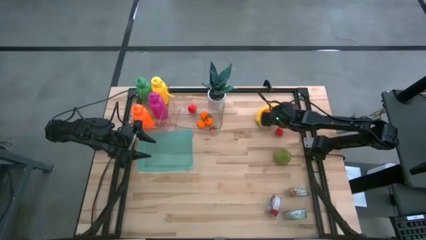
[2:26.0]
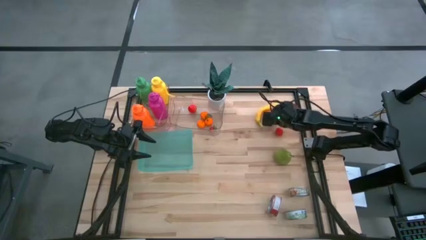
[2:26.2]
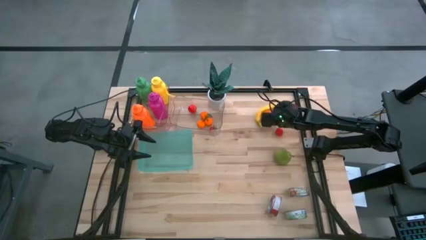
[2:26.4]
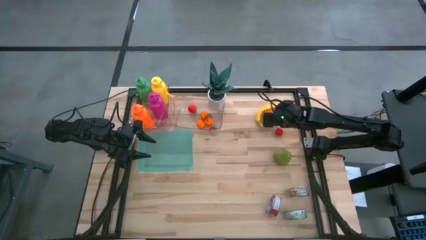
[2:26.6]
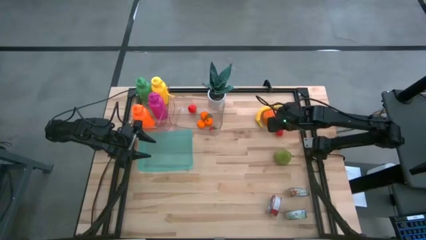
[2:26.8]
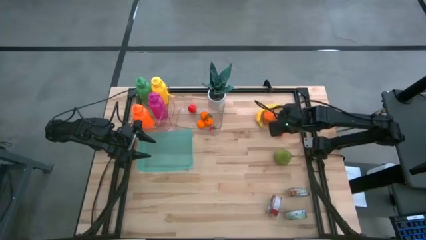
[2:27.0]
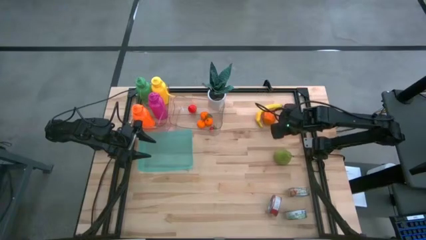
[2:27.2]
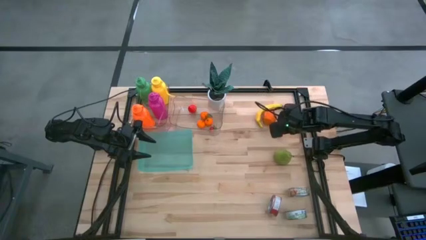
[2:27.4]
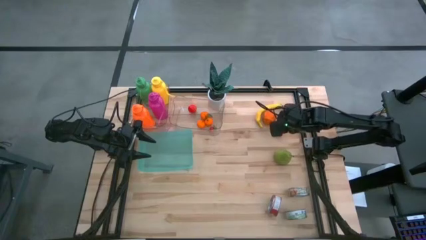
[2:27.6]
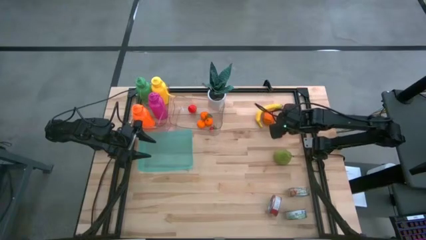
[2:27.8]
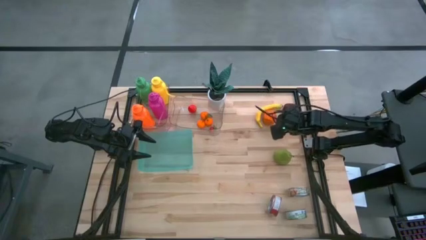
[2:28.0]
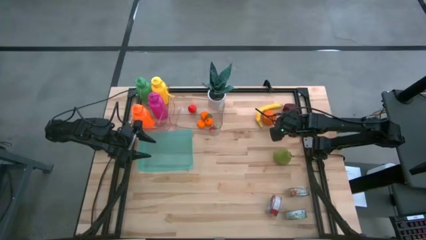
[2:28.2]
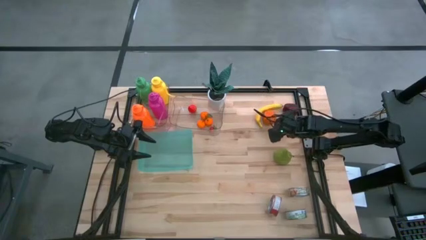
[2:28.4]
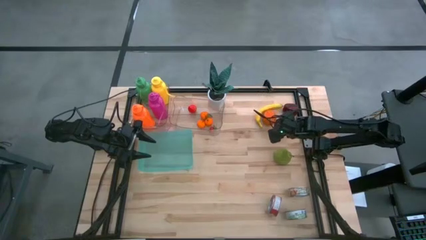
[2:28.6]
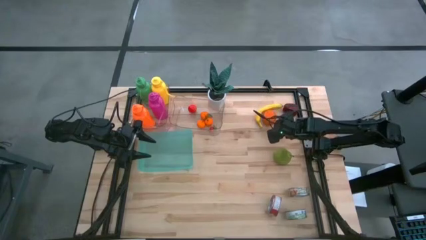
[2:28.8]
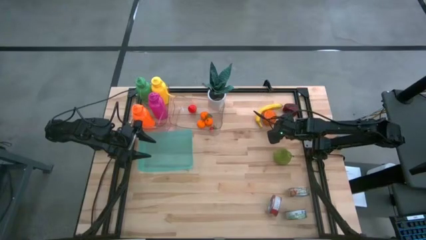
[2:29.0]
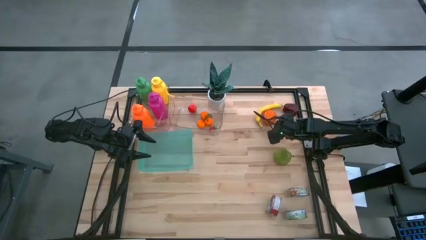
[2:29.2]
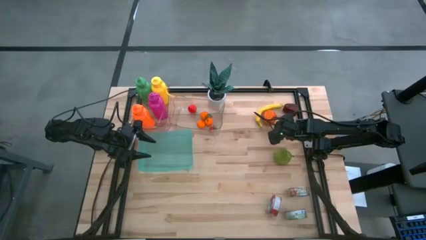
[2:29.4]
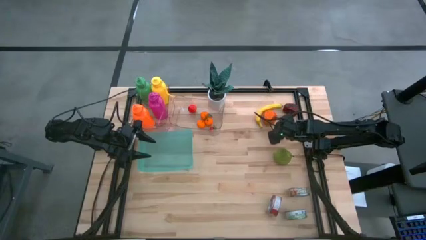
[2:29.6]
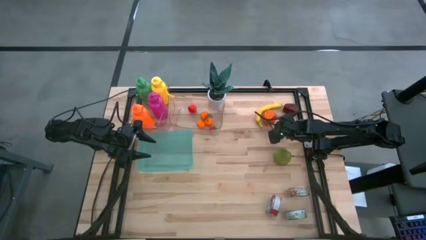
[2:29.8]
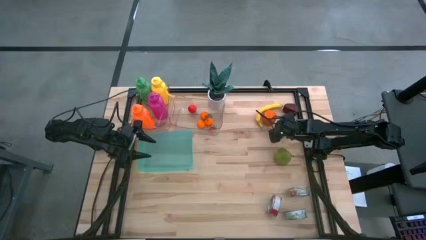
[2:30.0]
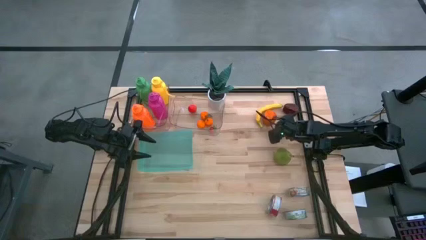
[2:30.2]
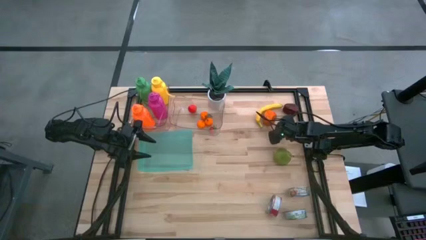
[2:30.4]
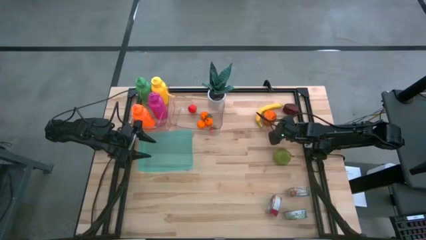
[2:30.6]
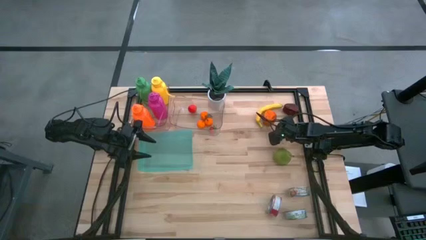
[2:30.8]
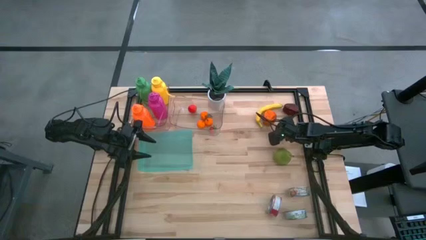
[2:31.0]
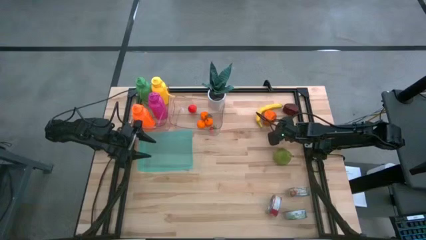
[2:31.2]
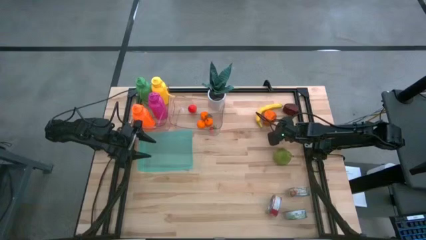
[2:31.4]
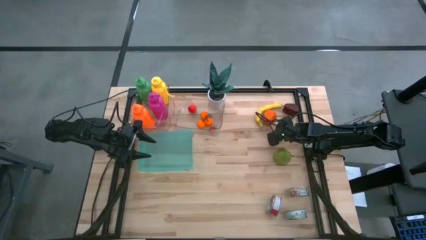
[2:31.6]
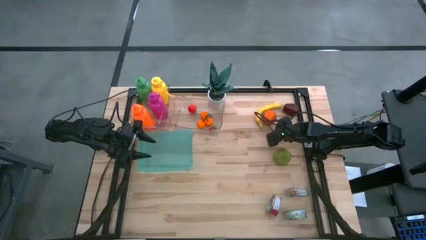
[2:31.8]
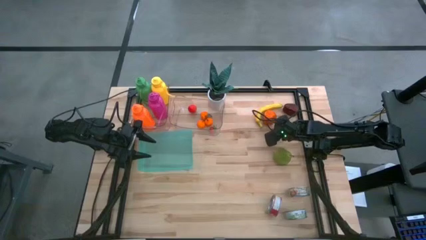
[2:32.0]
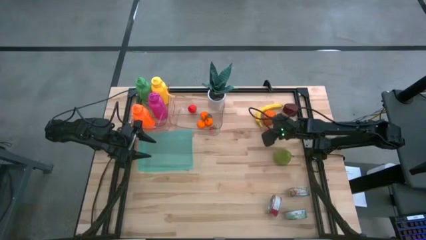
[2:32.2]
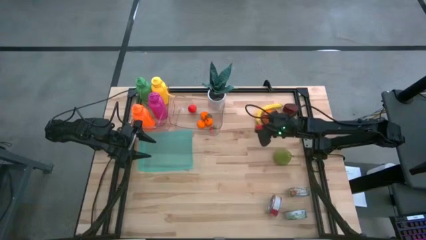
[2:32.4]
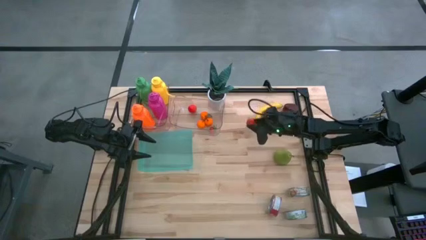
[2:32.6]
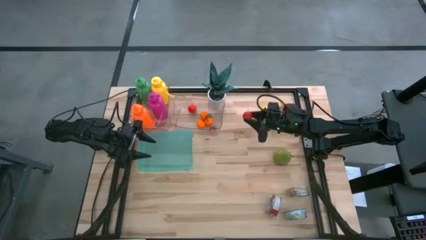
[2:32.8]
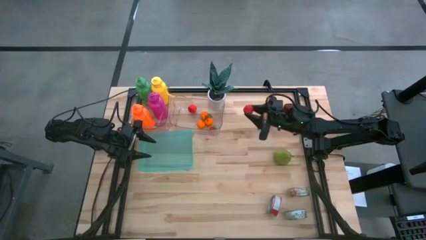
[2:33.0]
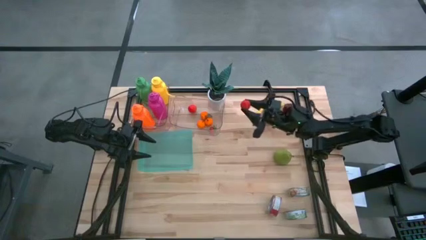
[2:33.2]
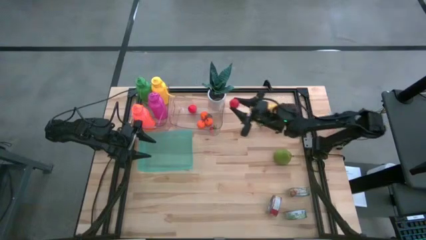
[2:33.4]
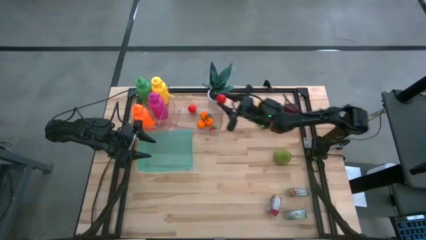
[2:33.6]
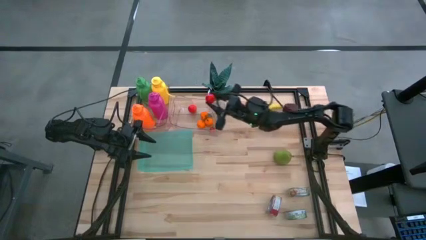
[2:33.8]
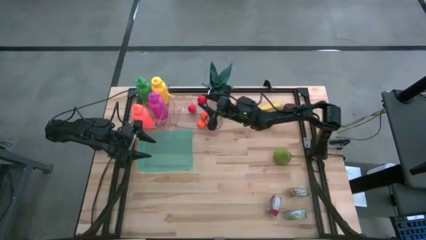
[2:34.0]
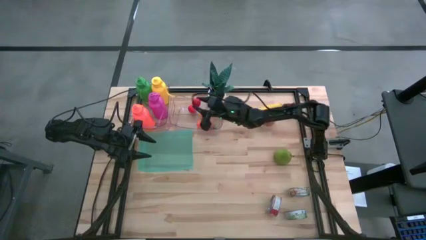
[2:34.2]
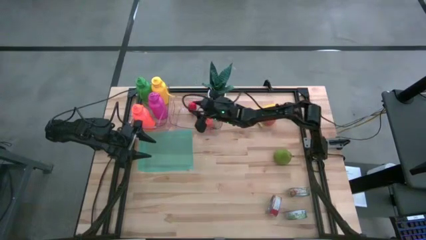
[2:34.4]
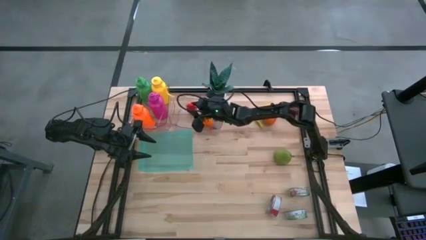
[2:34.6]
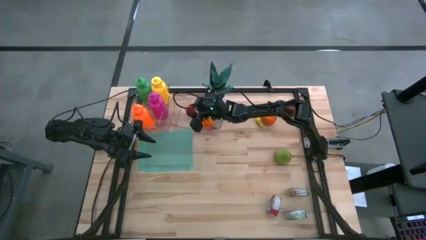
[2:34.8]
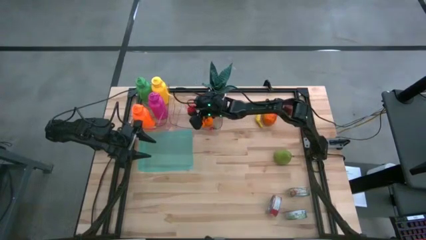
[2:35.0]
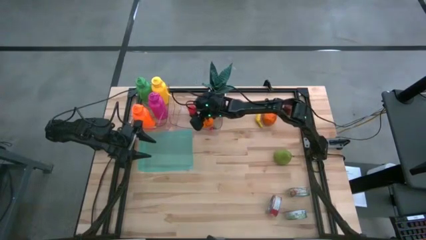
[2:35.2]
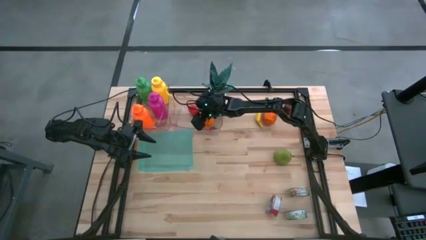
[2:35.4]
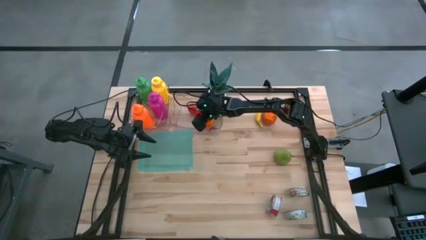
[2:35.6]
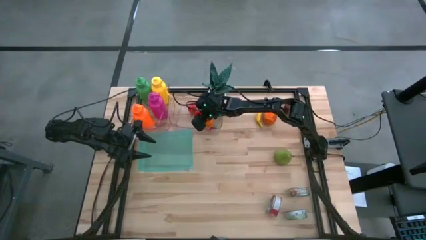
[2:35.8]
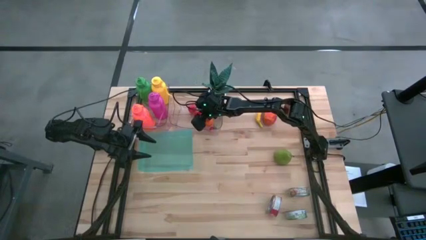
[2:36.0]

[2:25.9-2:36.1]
Task: Pick & Place Food Item
Put the red cherry into the right transparent bin

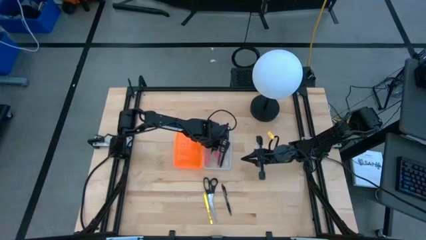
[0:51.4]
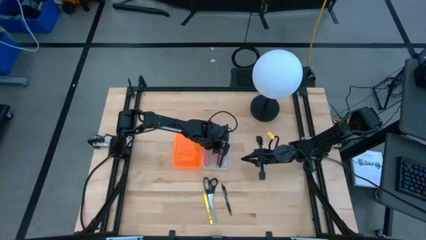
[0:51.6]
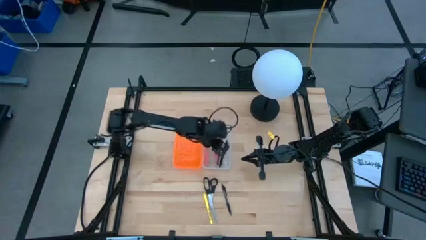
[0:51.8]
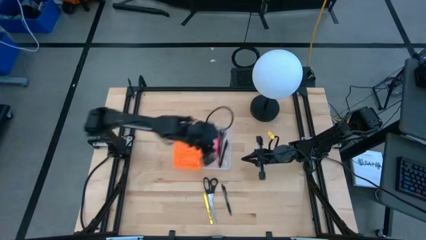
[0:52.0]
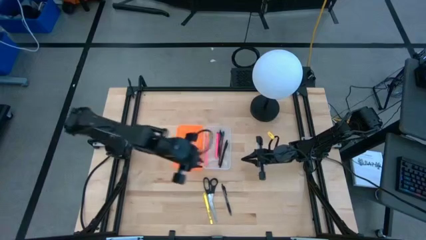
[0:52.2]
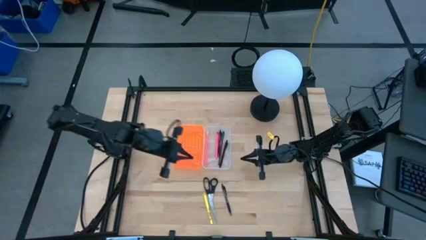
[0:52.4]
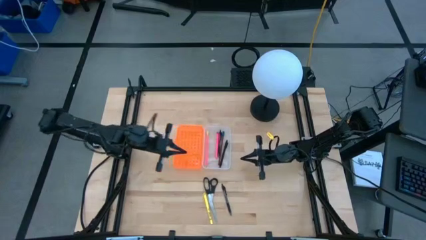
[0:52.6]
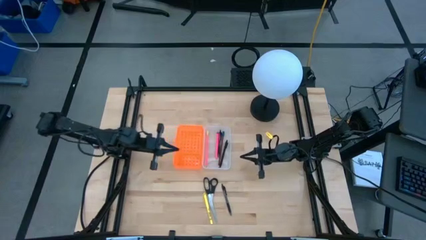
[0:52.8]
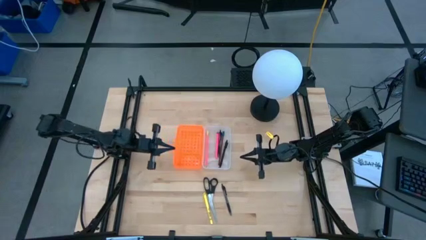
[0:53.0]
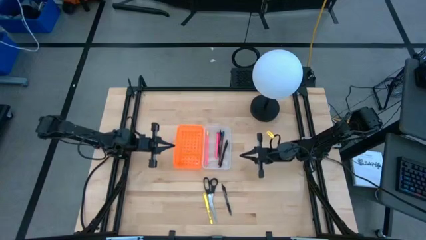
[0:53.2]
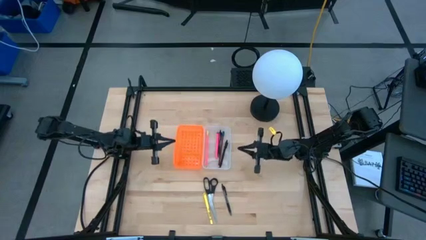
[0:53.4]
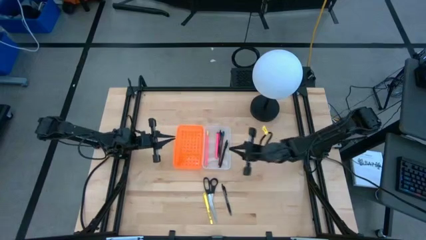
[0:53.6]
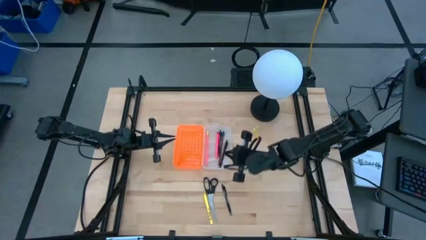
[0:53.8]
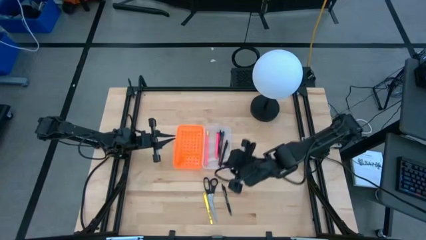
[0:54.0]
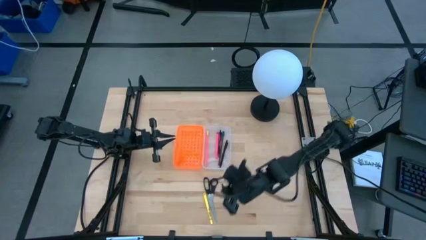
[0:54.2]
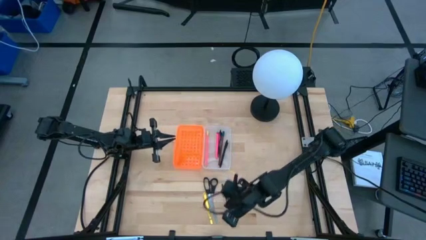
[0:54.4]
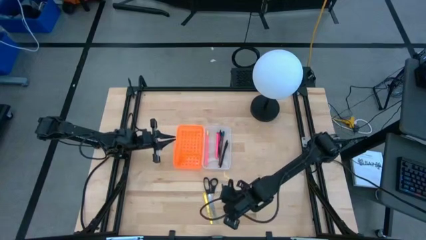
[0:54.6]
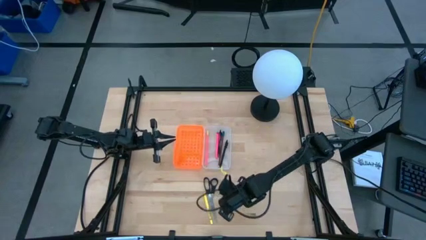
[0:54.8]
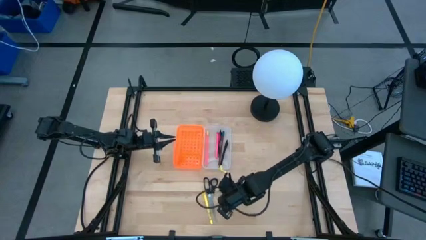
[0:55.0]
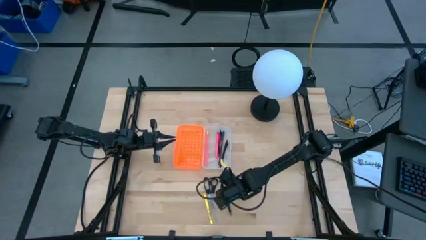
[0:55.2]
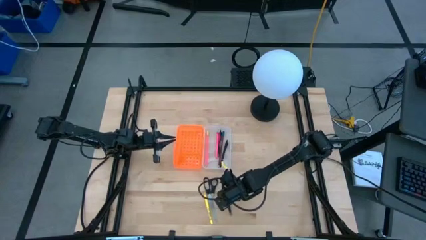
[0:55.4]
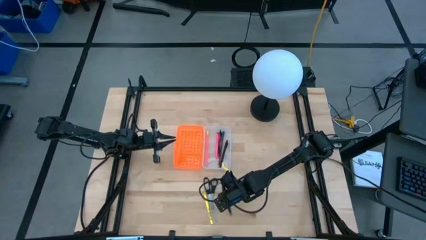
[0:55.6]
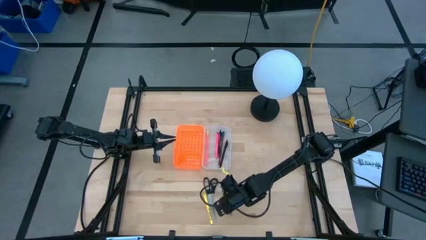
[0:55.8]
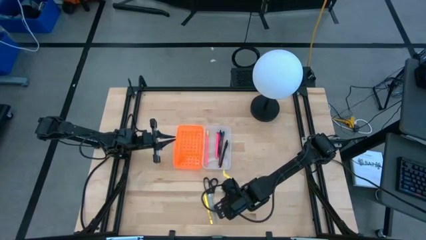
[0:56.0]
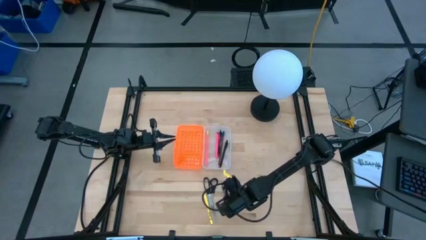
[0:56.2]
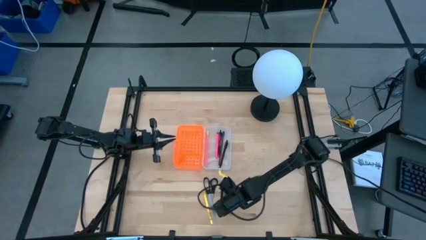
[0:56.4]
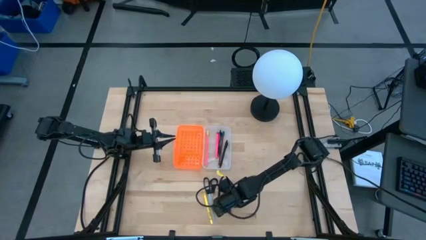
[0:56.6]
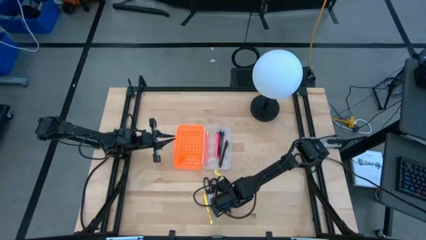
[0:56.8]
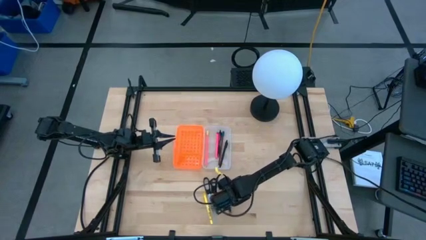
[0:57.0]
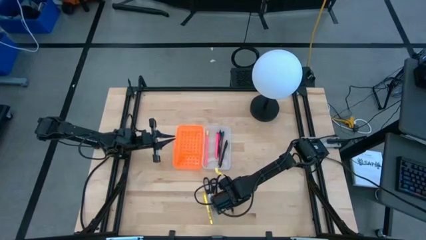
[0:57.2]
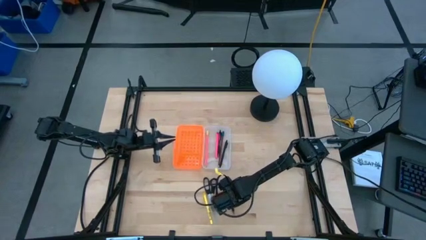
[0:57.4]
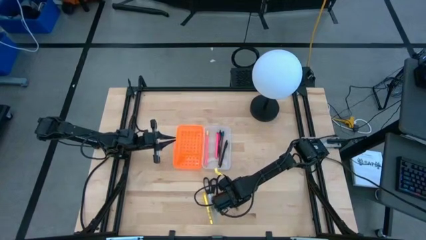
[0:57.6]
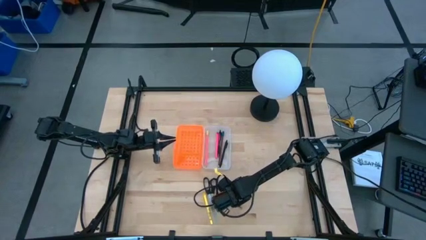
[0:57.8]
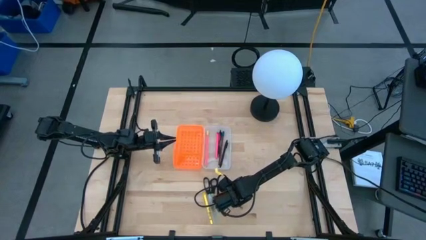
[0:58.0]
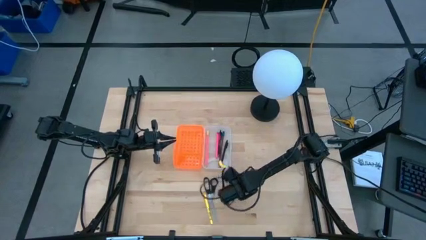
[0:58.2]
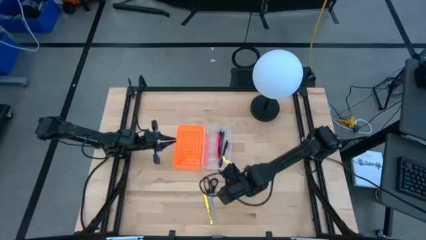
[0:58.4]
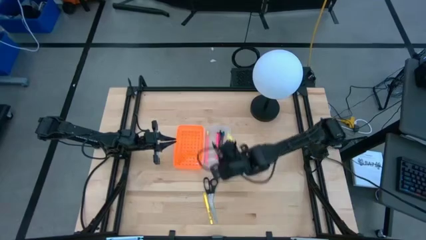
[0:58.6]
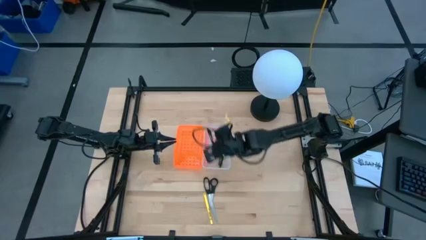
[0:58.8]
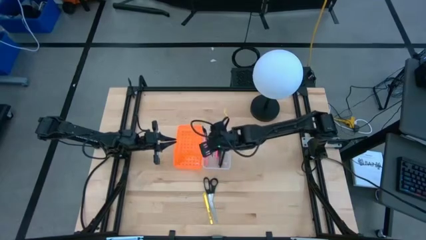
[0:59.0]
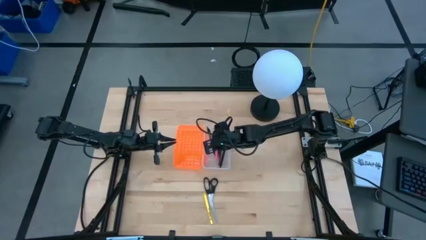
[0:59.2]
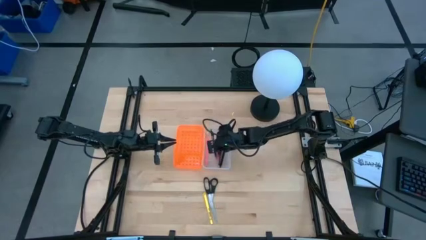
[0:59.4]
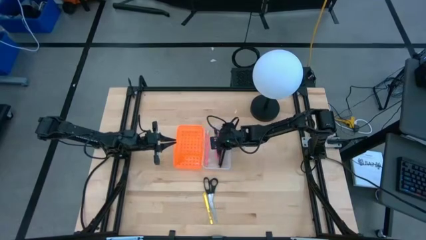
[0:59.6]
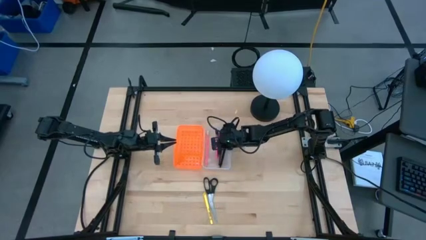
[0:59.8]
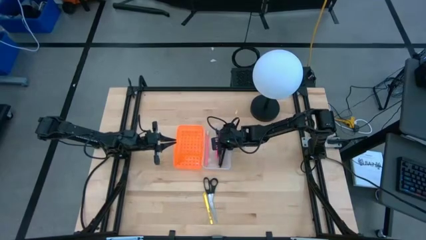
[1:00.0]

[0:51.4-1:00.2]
Task: Pick & place school supplies into a supply box
Put the black transparent pen into the supply box
